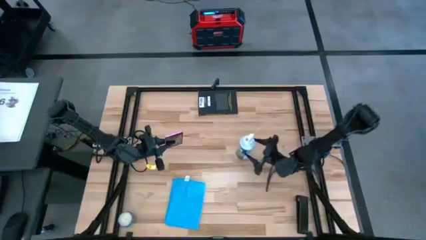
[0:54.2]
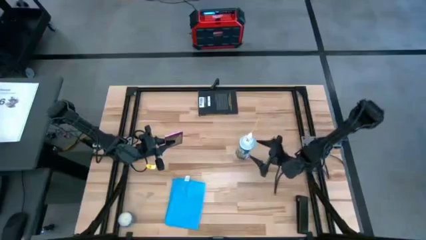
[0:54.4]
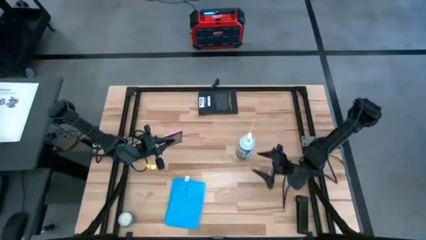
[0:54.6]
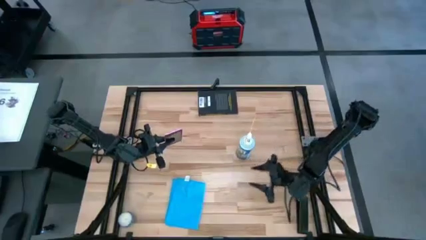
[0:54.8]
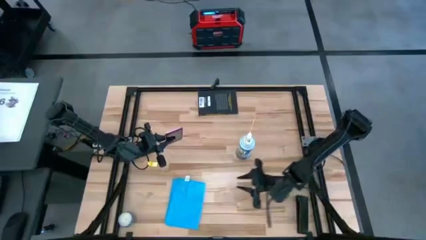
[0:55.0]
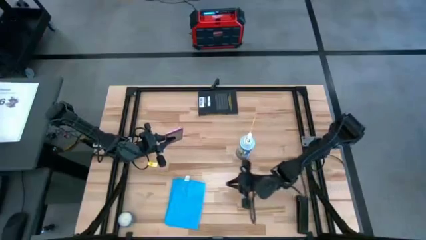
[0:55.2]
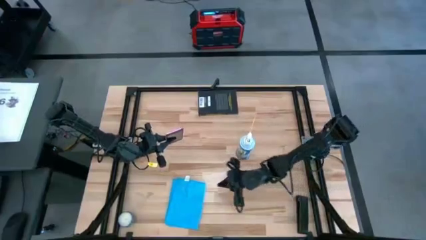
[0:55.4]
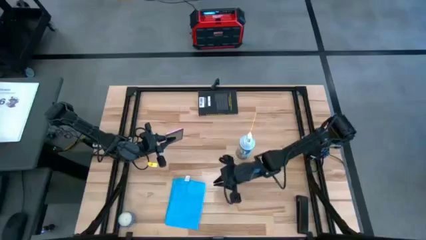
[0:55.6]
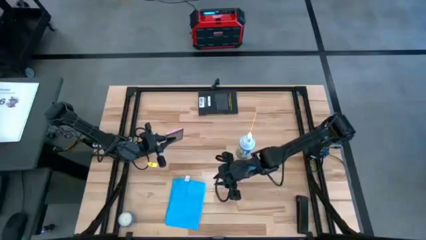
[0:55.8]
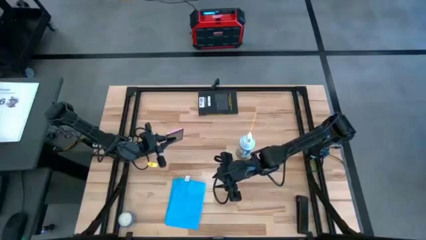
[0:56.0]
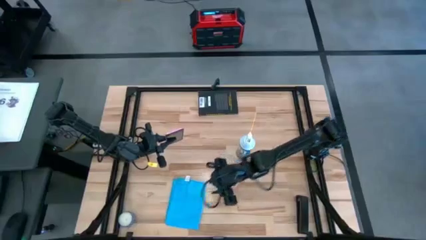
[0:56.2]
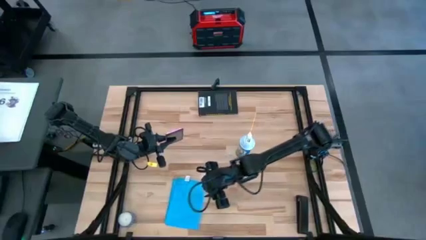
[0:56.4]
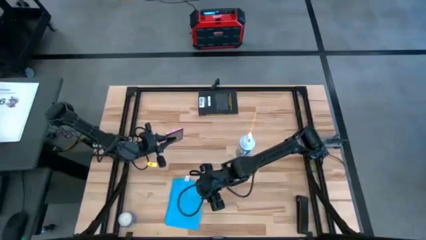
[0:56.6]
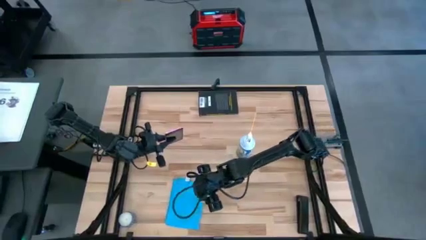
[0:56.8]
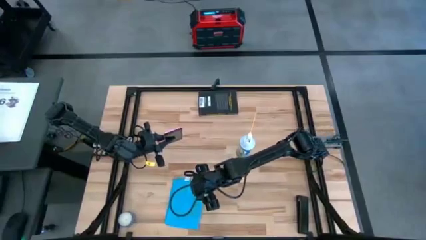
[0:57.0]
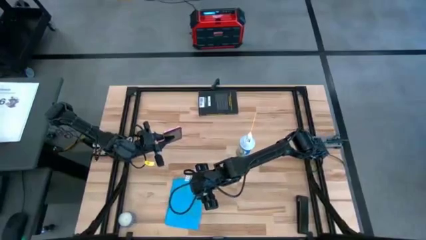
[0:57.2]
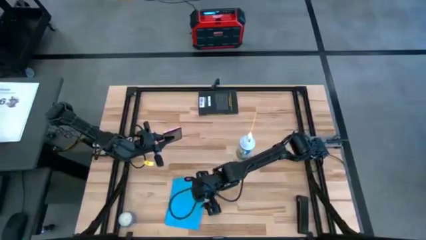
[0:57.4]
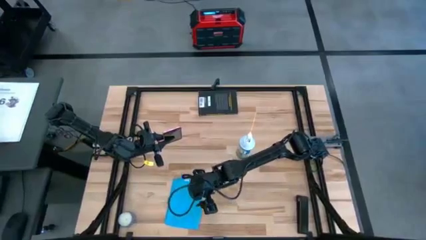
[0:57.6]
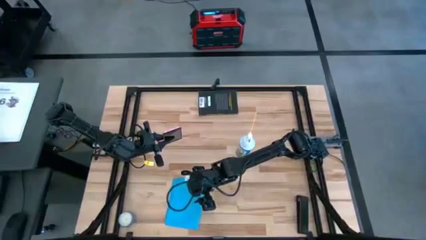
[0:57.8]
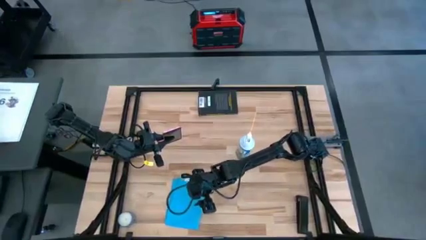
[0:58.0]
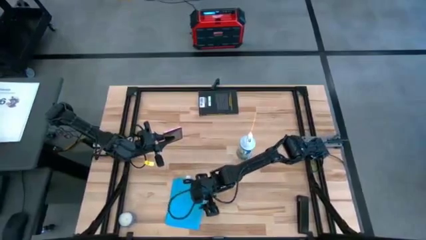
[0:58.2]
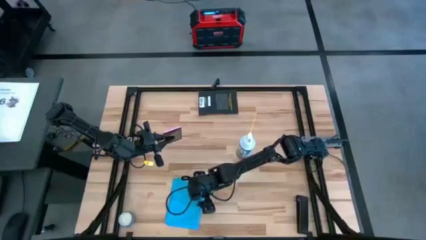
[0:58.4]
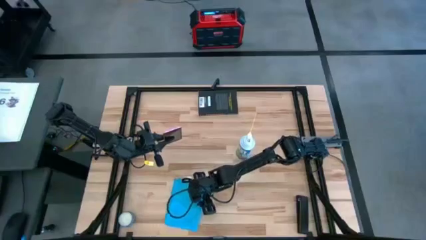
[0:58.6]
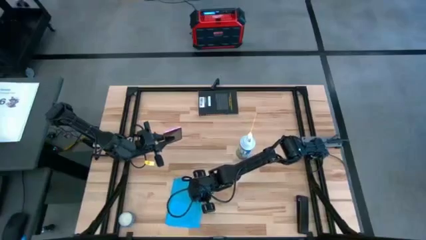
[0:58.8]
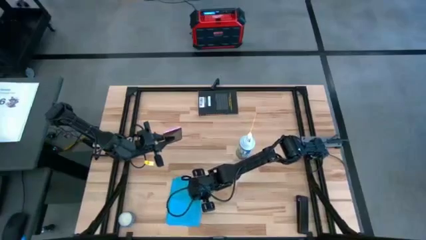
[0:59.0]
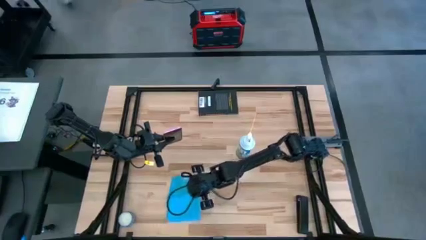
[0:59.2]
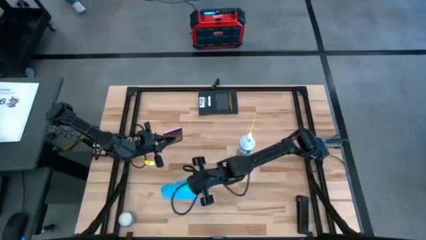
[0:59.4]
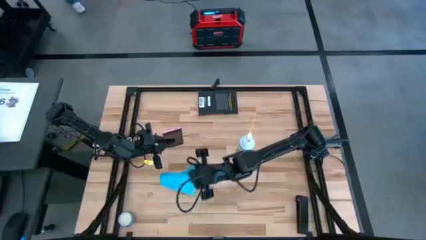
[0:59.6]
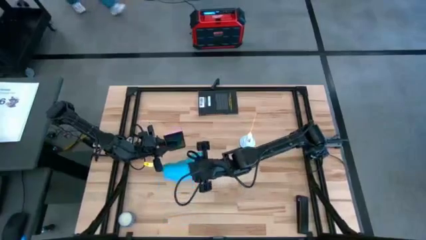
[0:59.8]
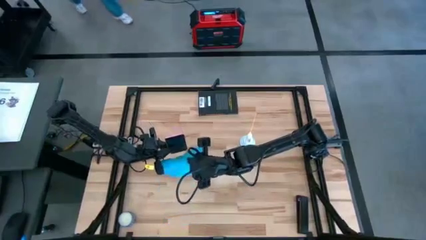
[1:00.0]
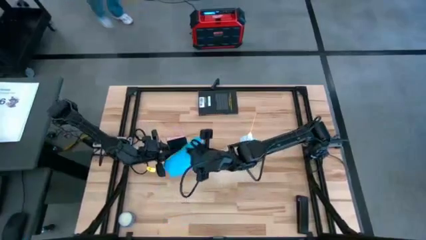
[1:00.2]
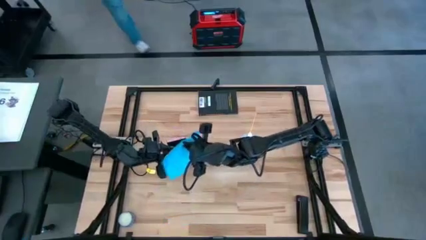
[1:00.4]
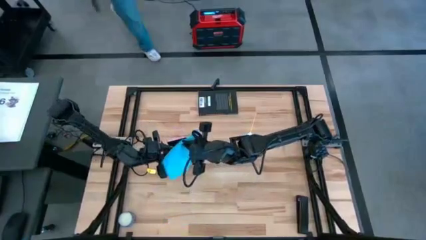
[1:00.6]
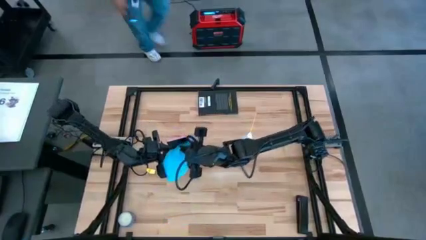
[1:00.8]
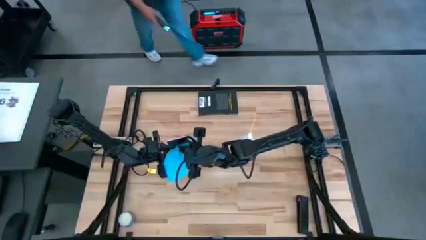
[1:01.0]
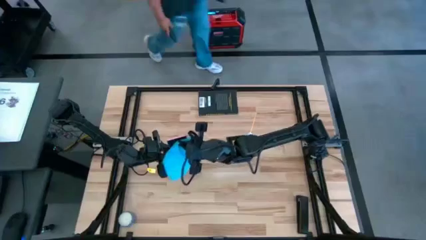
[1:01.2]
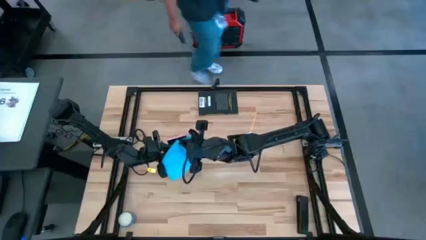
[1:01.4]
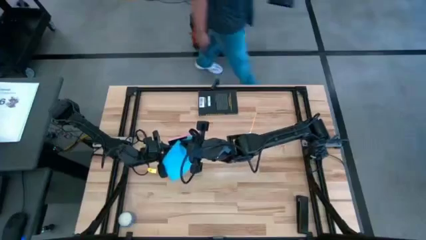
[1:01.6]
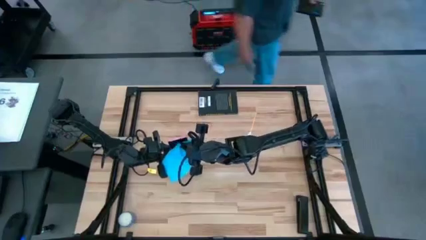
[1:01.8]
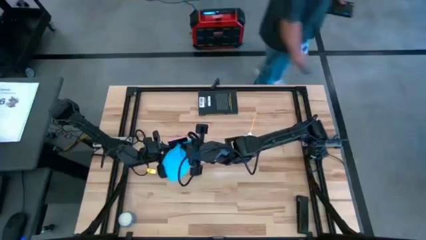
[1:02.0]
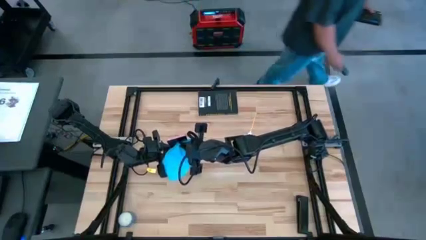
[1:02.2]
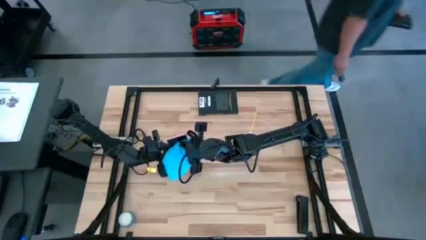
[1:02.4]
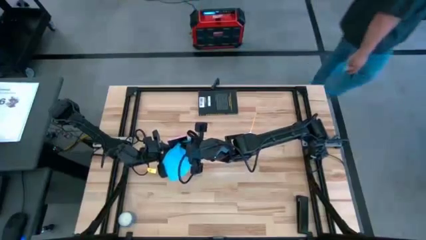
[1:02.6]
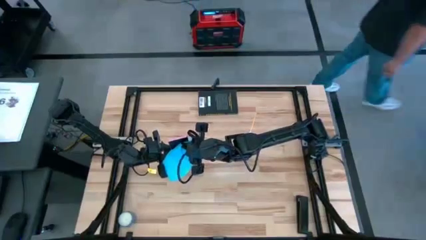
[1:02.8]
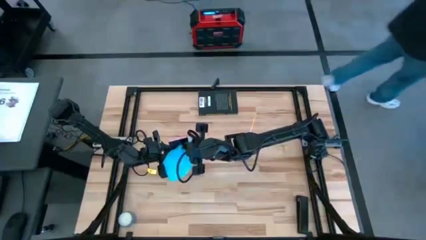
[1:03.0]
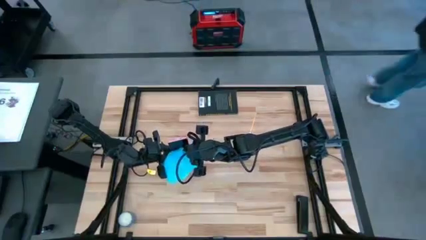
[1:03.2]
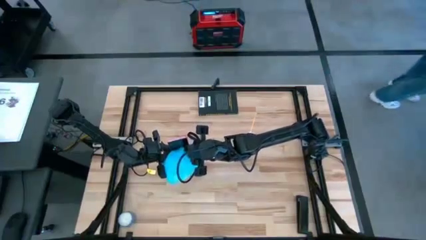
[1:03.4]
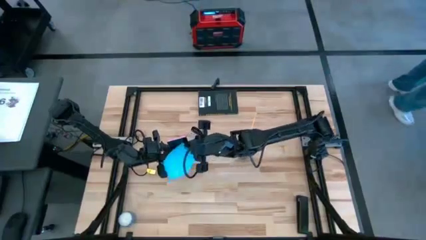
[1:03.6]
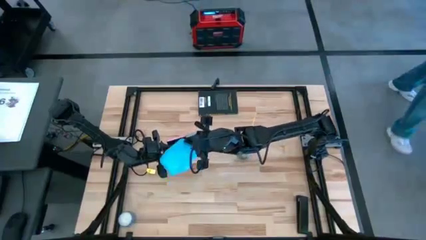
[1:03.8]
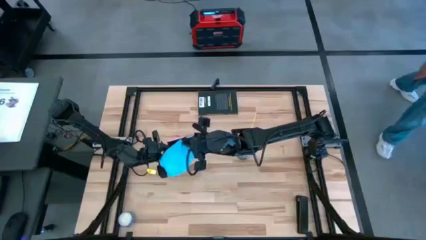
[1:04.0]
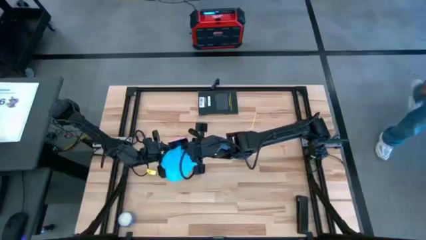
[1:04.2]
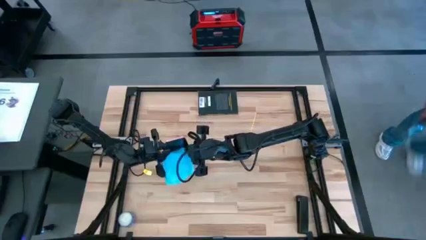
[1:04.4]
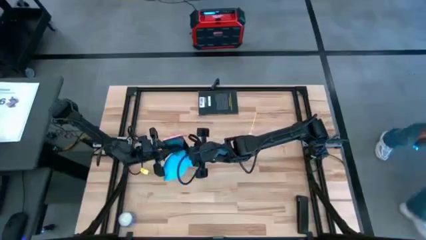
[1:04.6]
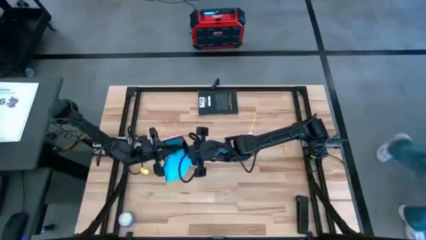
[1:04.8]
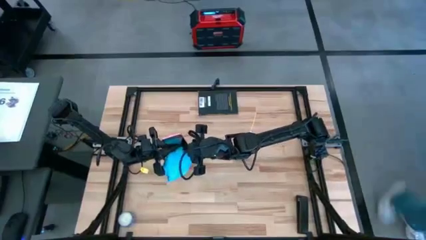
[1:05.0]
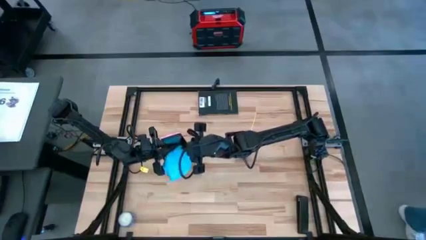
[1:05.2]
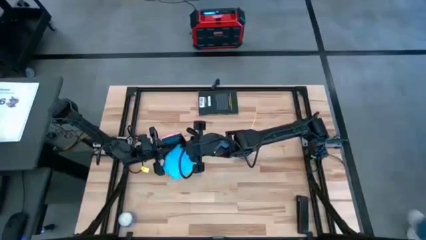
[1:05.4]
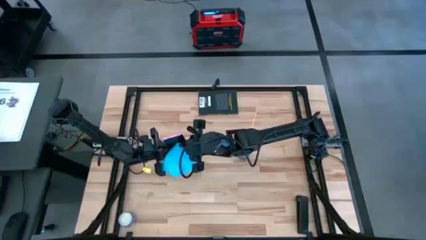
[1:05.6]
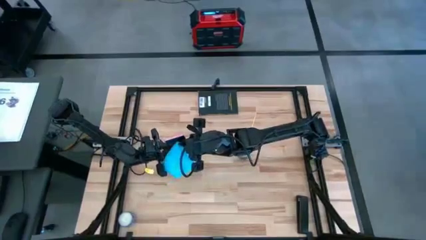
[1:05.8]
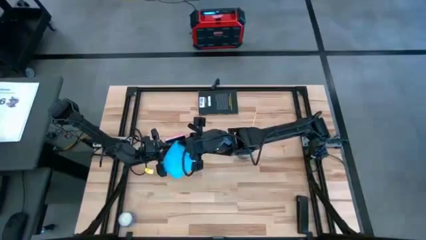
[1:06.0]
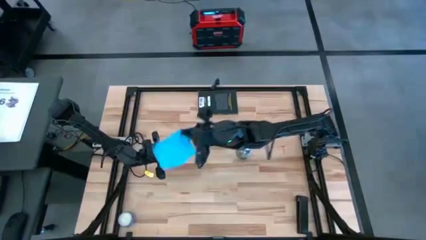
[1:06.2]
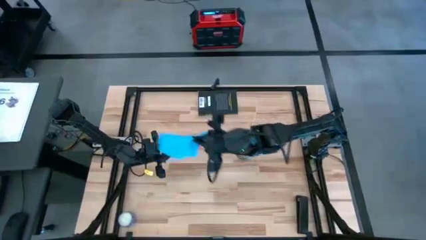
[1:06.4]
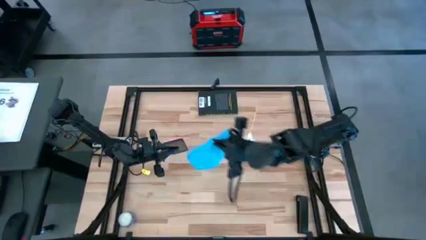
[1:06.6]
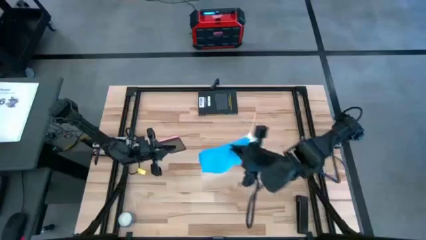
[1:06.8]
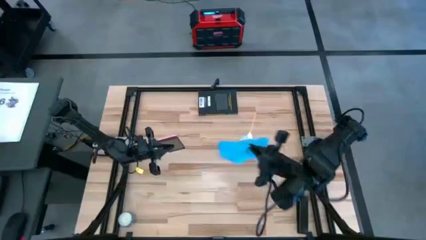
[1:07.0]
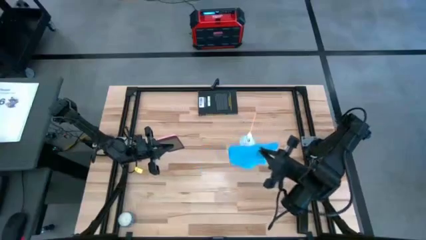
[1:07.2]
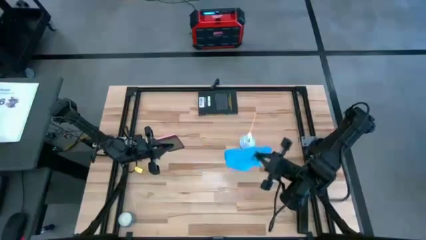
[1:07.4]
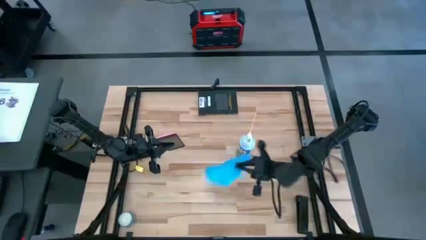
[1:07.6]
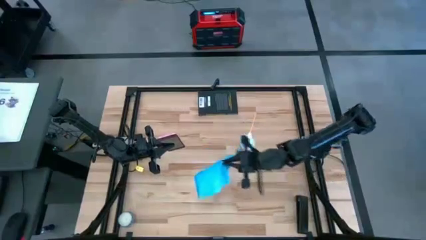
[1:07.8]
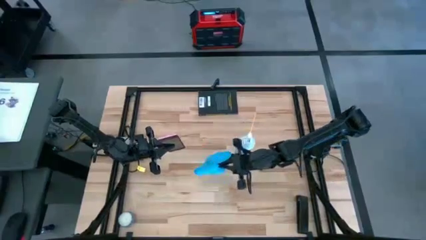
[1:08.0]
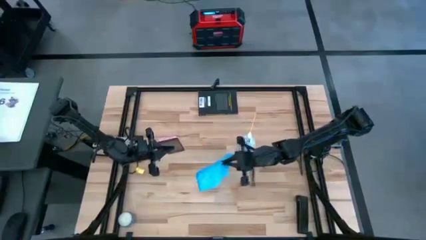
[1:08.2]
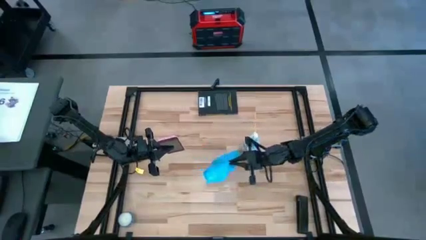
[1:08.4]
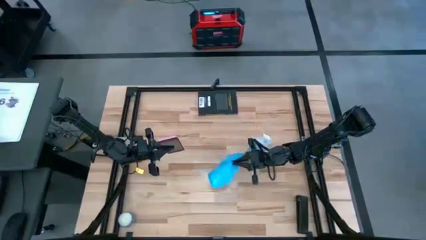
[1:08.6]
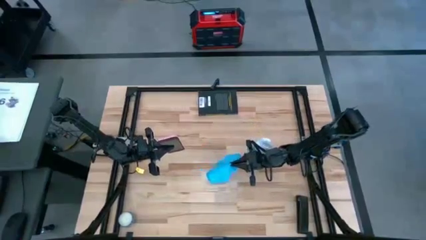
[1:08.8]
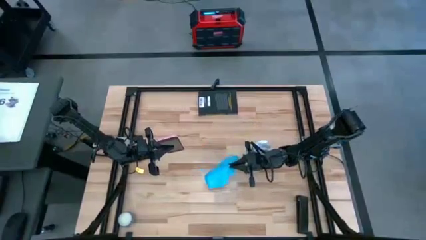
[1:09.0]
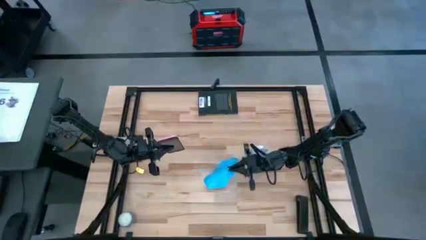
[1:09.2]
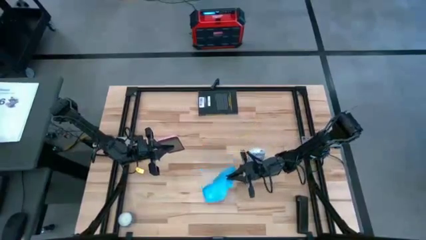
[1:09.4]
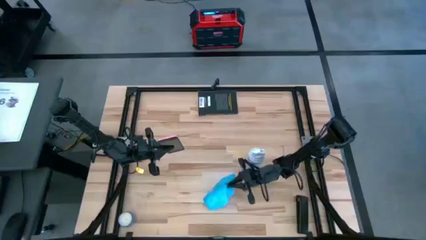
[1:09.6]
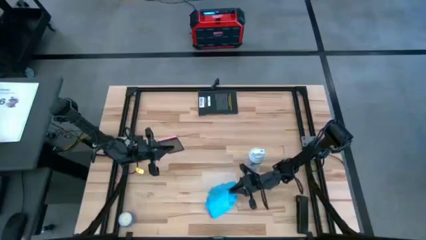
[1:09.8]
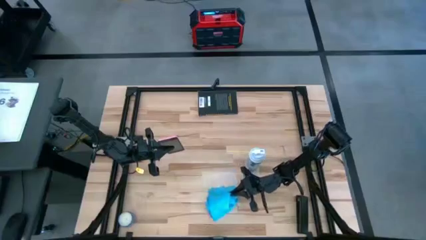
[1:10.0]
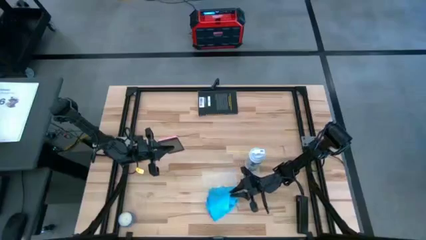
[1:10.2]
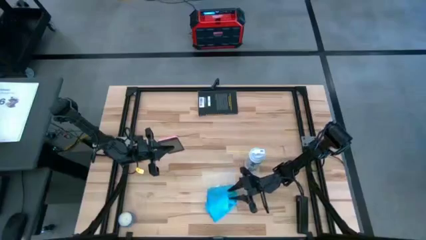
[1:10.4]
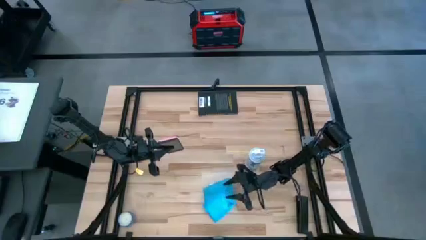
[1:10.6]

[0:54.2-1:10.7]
Task: Apply microfiber cloth
Wipe the front of the cellphone with the microfiber cloth
